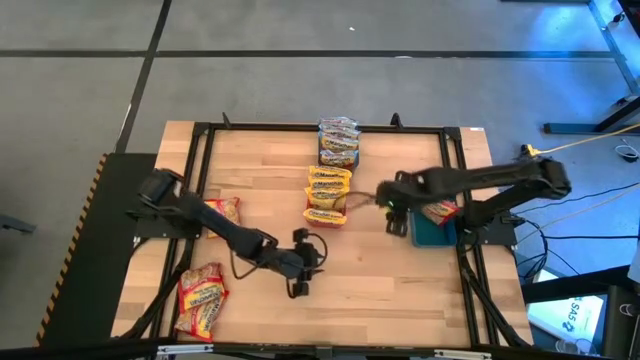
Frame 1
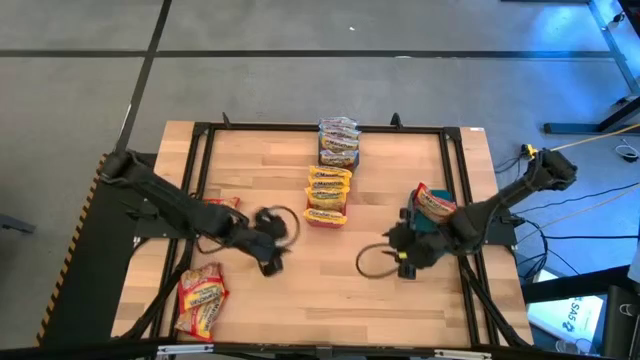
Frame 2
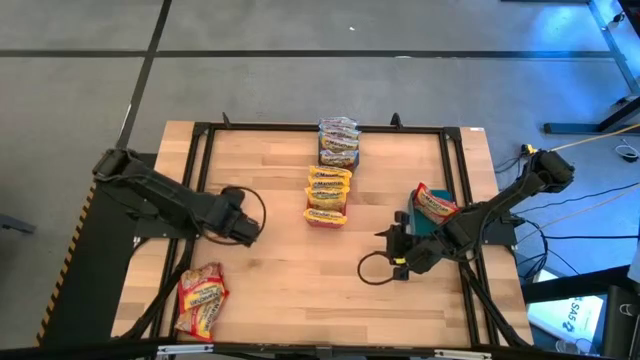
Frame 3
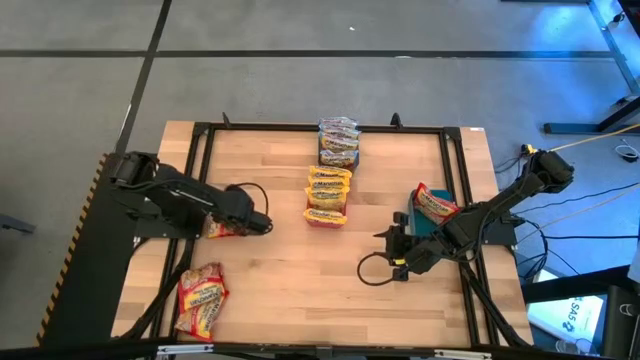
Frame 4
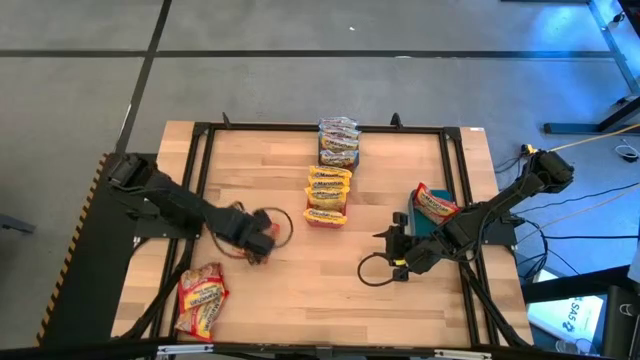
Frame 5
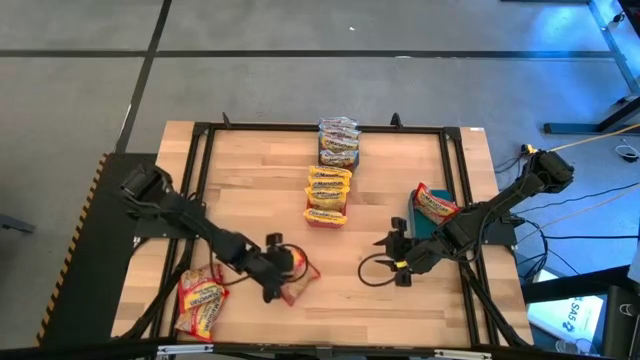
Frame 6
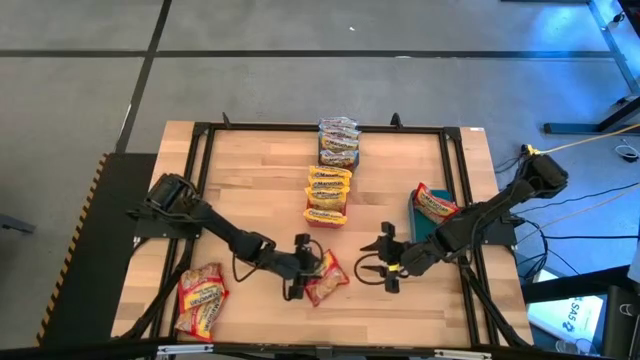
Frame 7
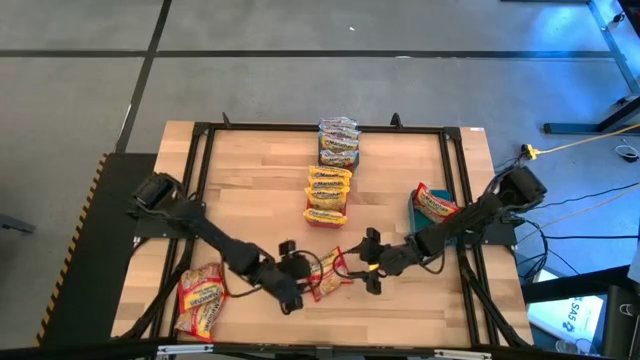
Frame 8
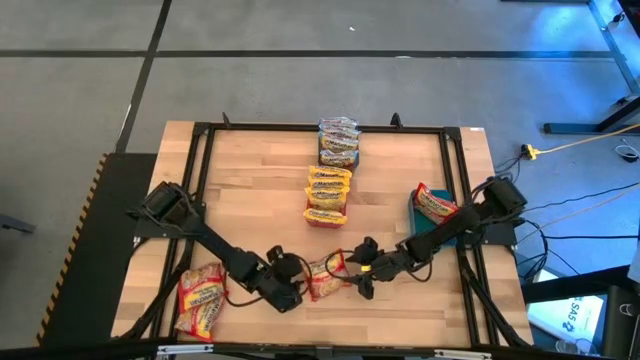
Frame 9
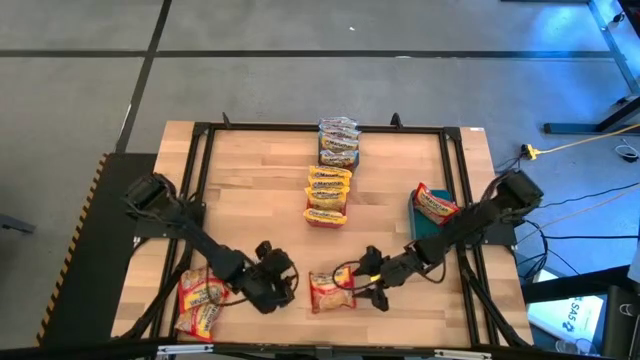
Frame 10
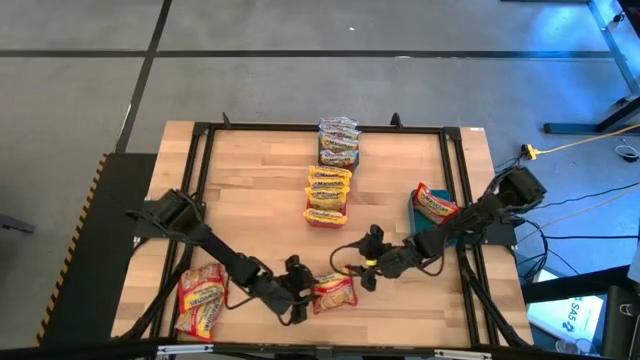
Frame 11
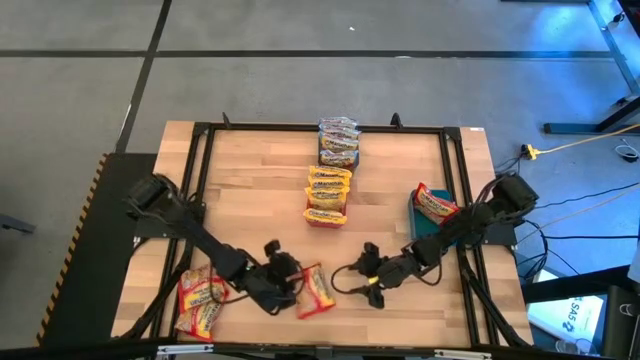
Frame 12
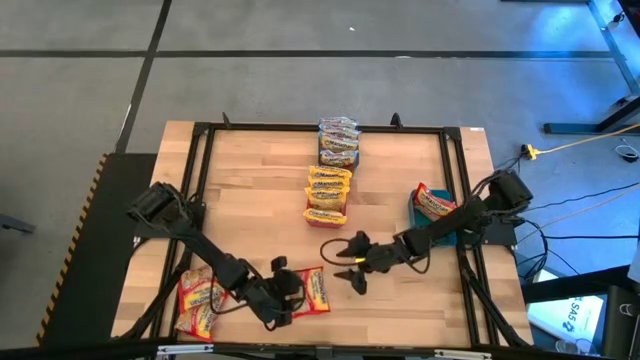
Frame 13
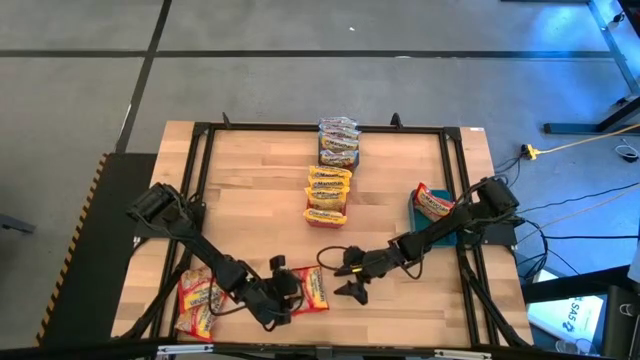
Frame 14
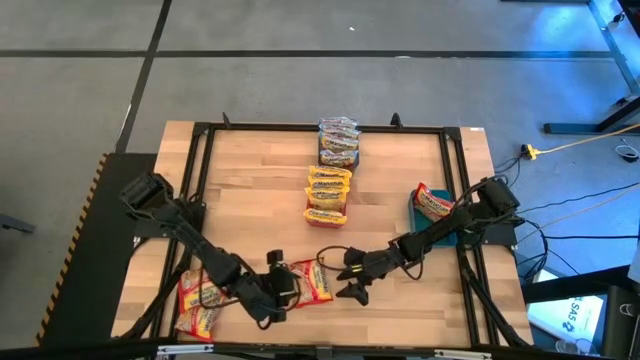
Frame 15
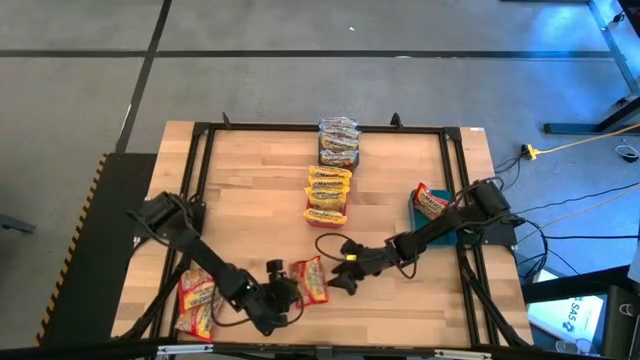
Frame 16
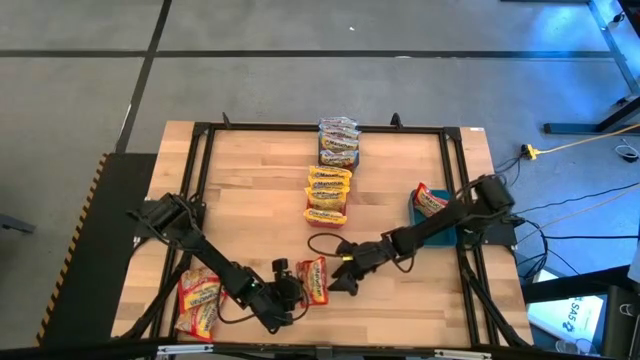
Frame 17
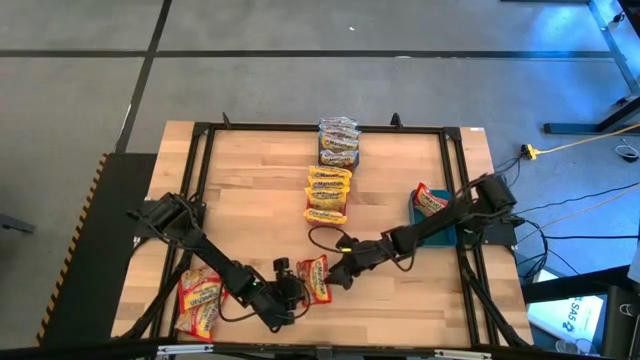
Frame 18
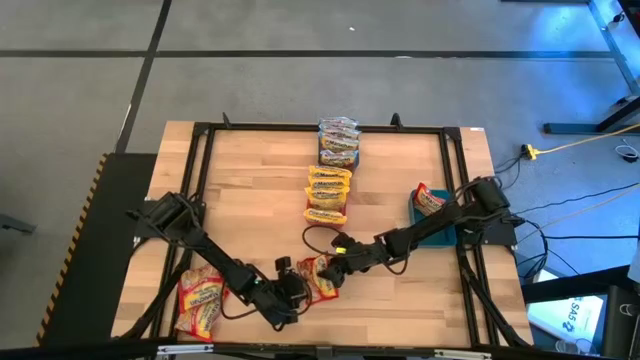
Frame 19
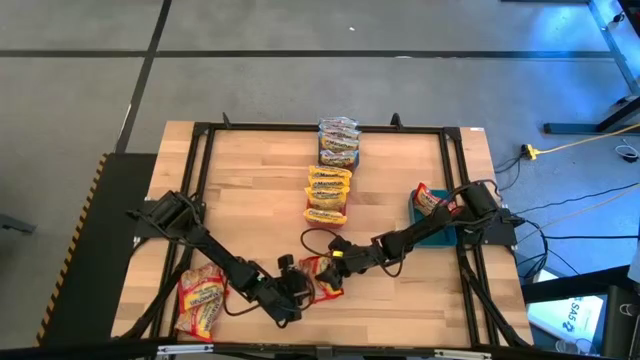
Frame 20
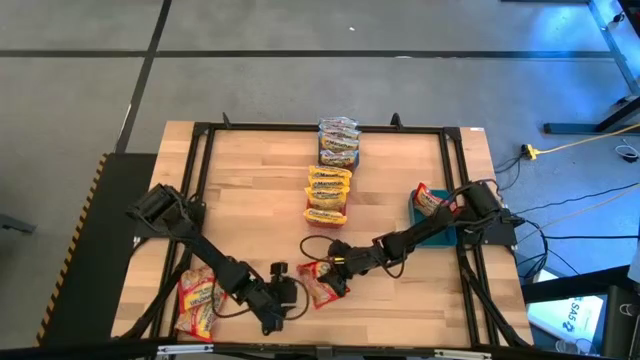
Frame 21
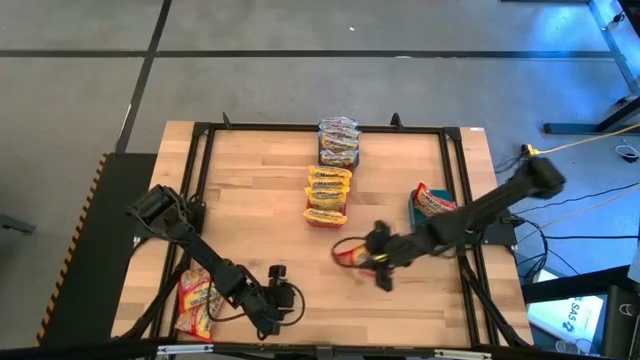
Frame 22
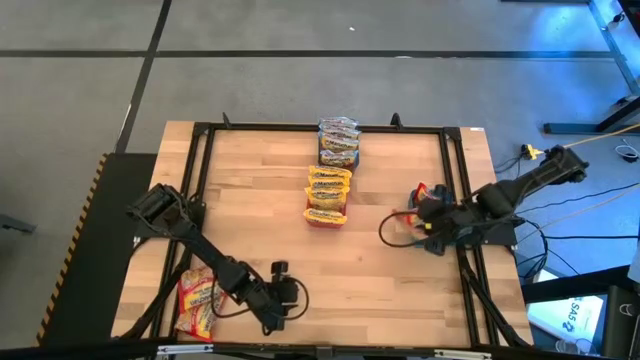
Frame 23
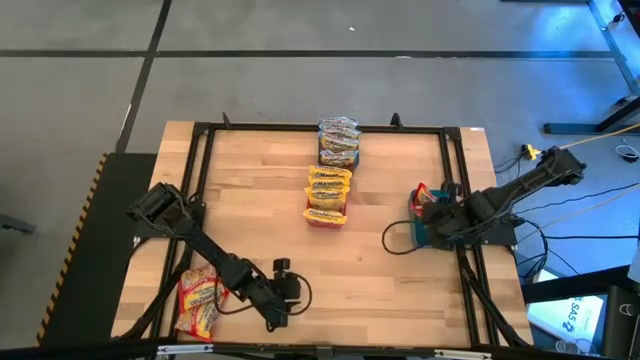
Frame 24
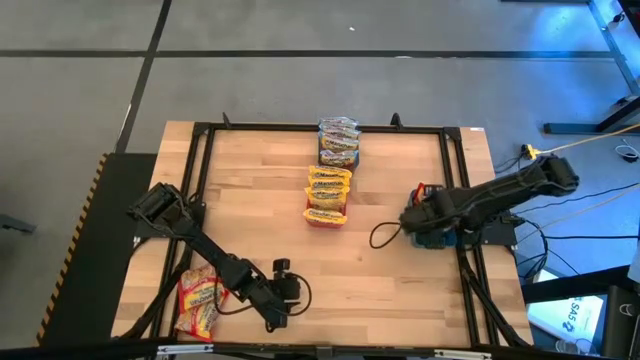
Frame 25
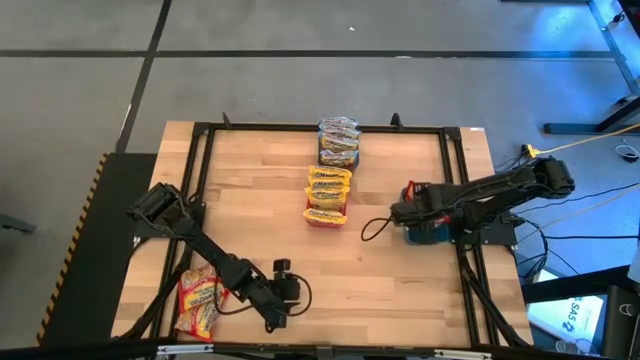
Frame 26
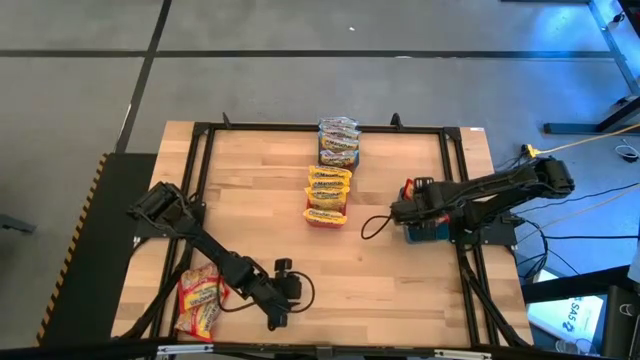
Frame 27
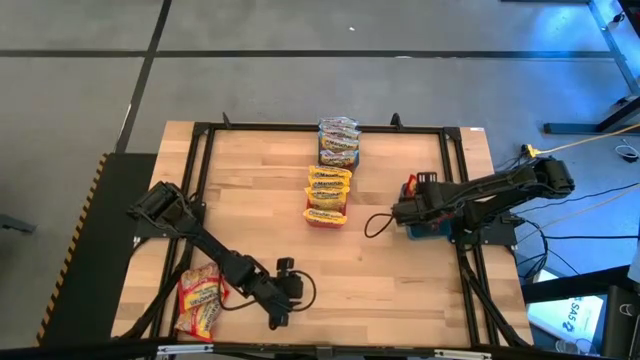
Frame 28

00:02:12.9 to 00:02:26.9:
Task: Sort Maruchan noodles
Put the orange noodle pack into the blue bin

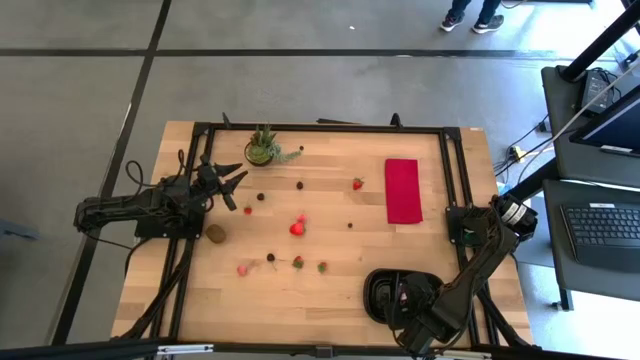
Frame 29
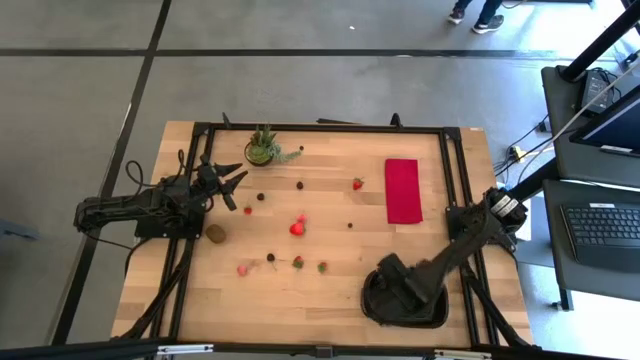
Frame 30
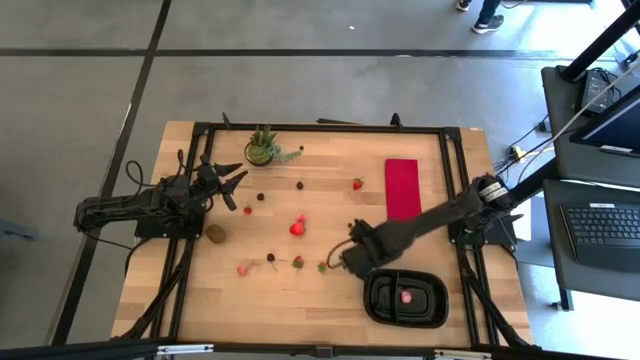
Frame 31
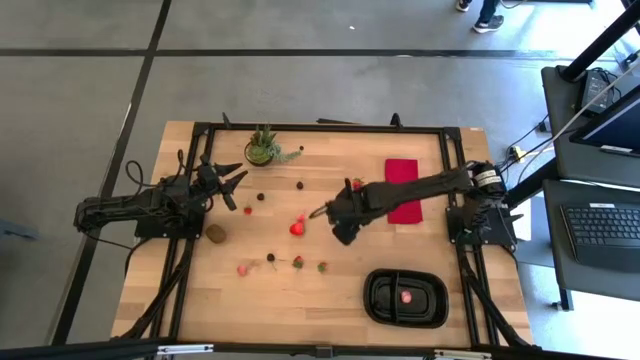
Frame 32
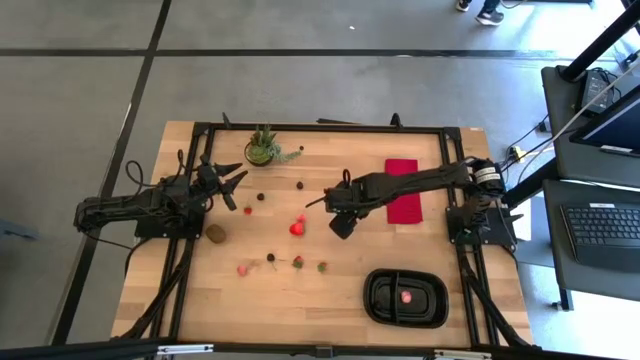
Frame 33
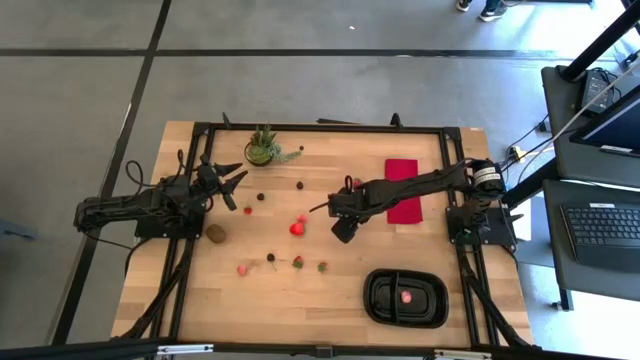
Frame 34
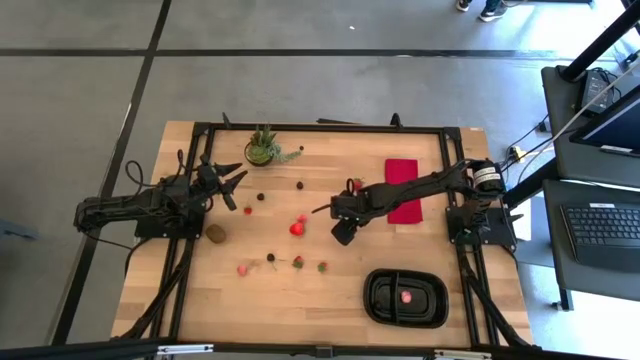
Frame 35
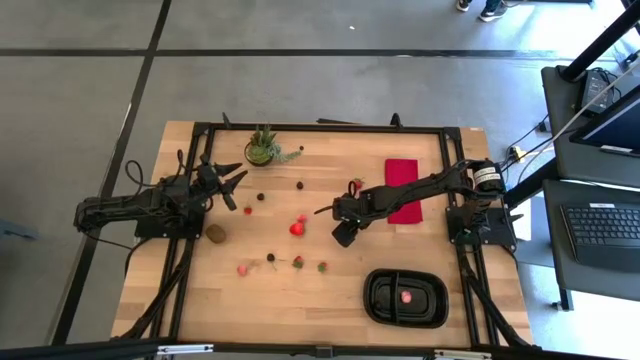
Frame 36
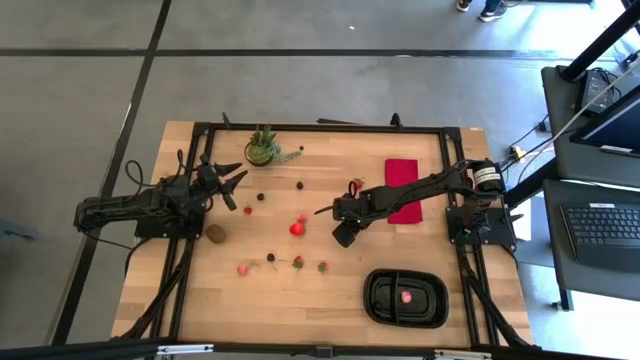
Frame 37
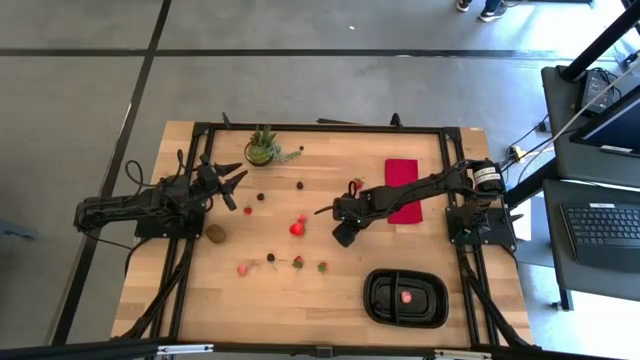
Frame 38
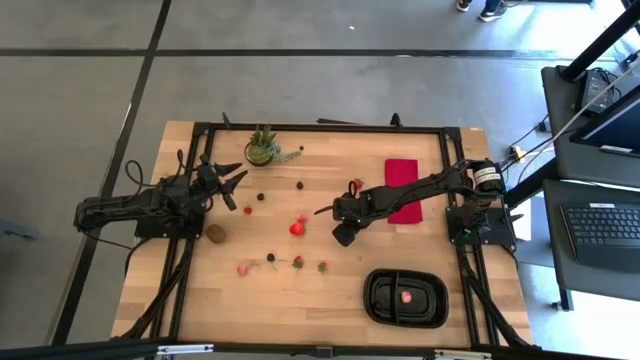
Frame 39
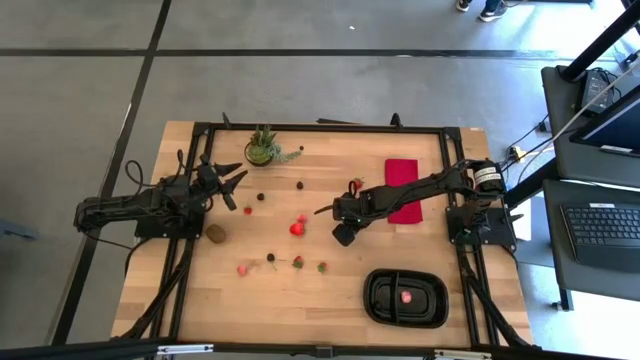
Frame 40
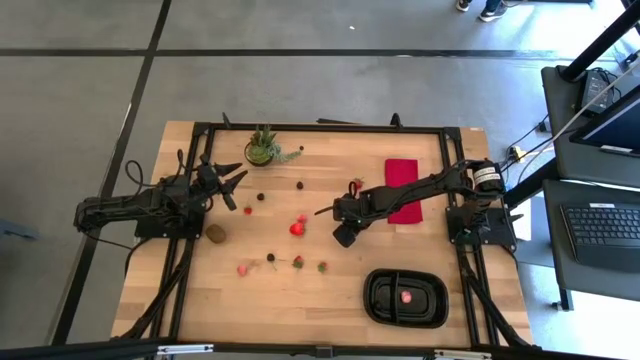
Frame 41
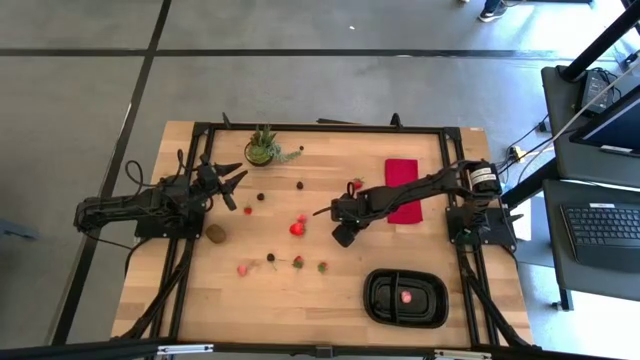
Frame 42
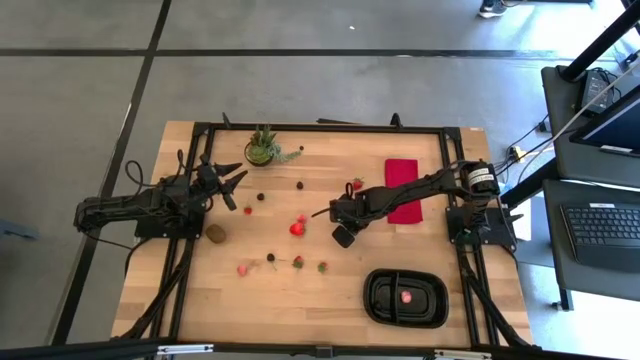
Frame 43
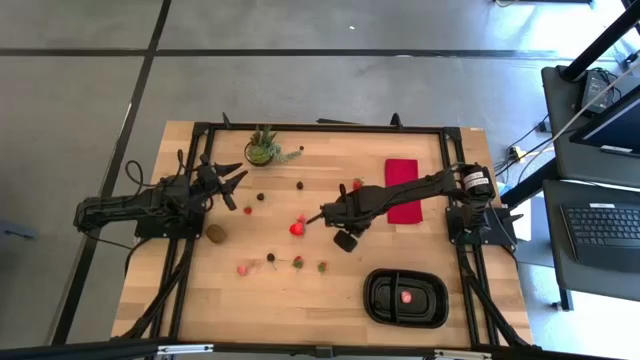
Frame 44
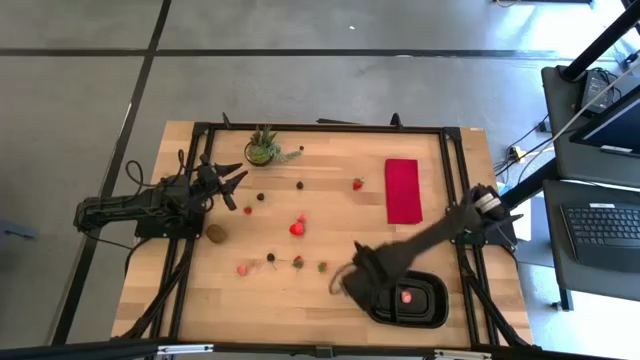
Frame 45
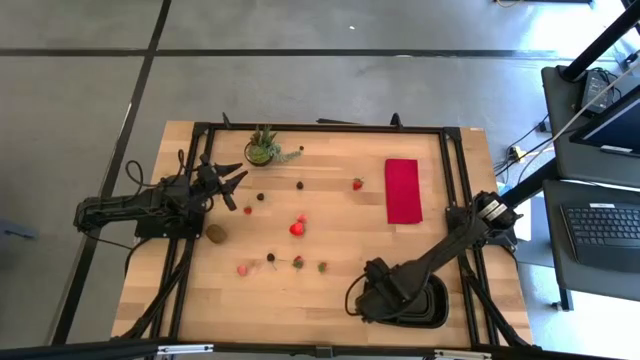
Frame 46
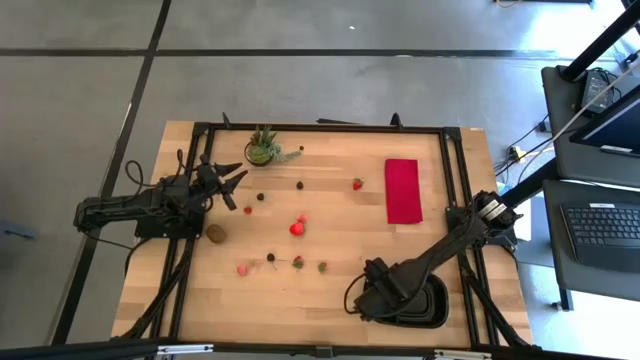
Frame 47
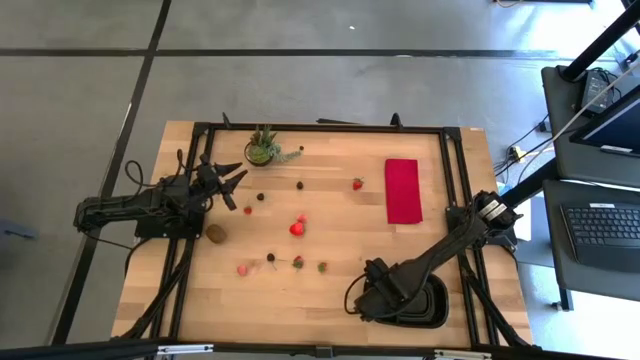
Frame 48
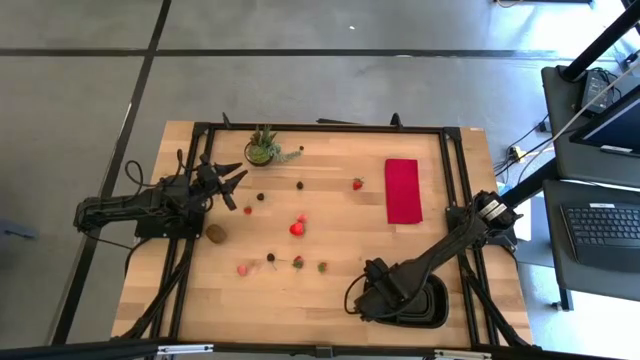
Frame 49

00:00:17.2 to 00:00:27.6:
Task: Pick and placing Produce into tupperware
Put the blueberry into the left of the black bin
